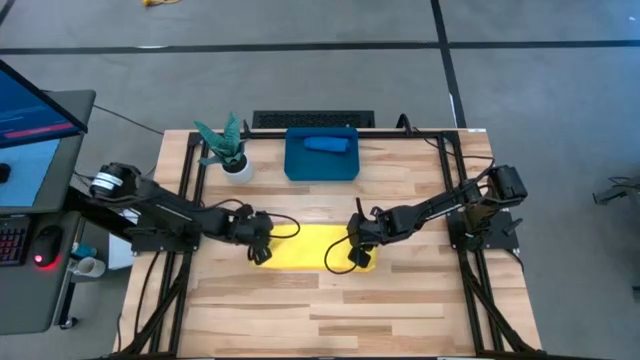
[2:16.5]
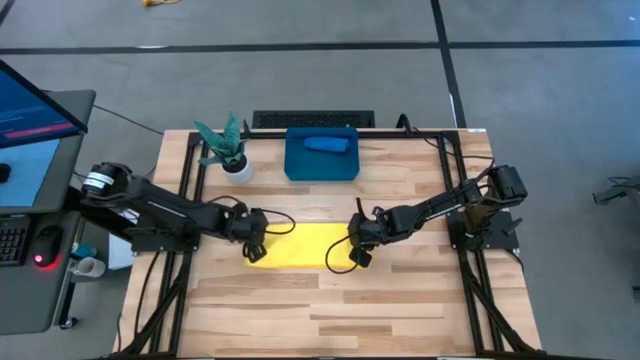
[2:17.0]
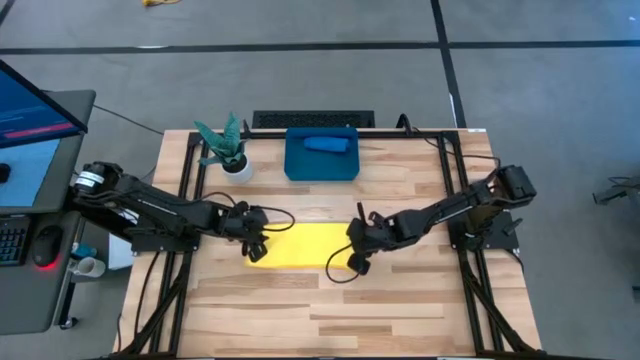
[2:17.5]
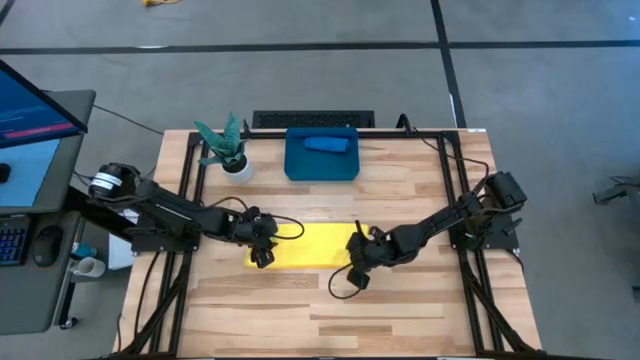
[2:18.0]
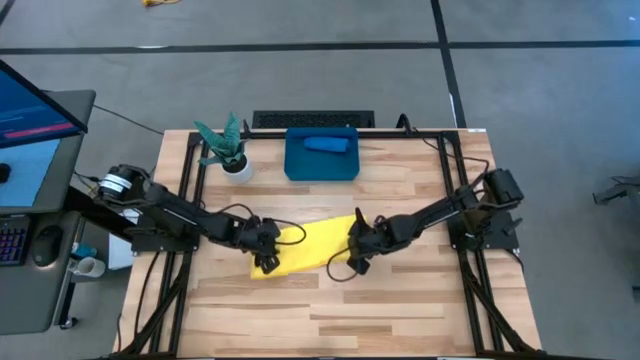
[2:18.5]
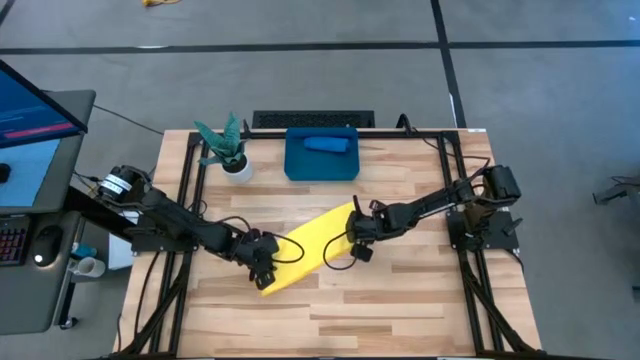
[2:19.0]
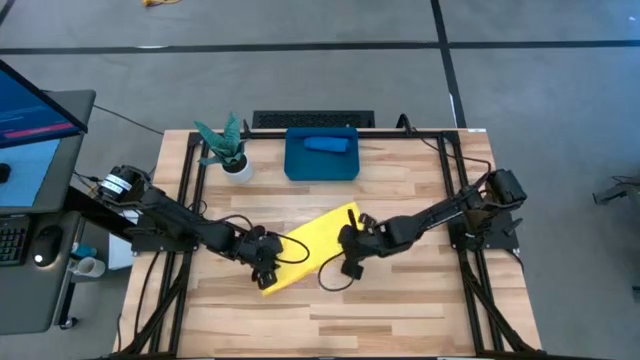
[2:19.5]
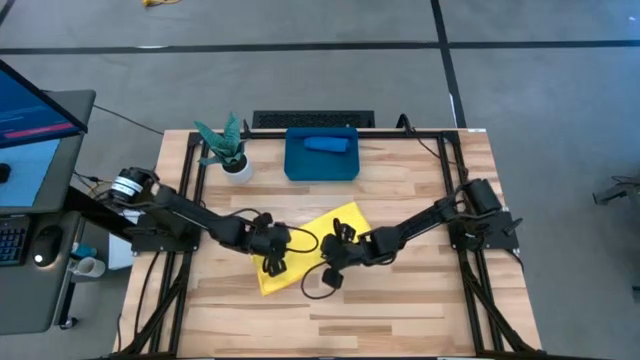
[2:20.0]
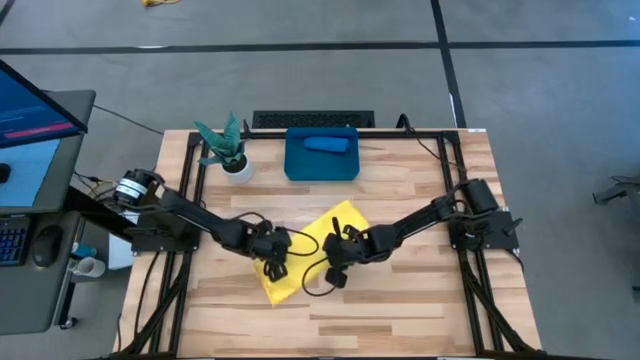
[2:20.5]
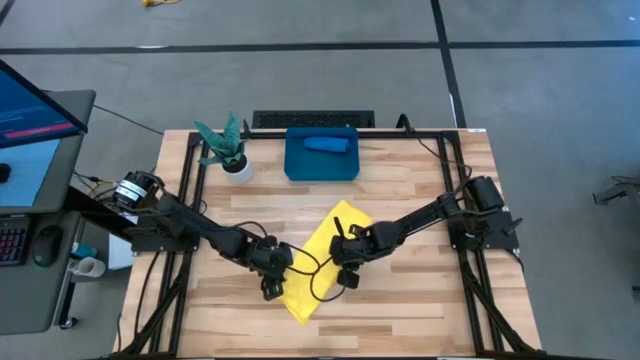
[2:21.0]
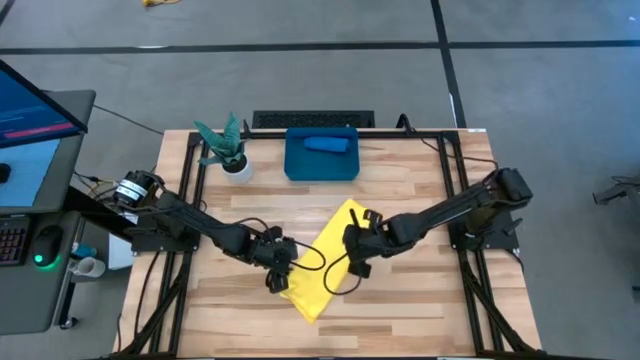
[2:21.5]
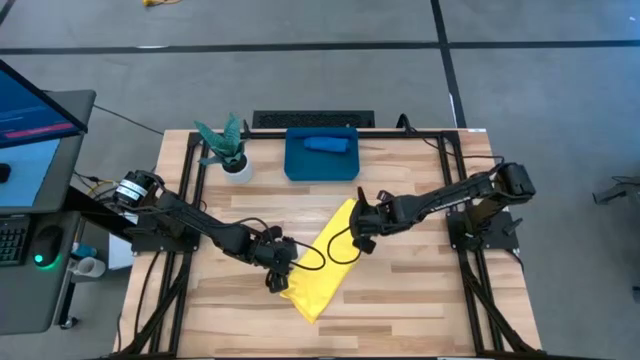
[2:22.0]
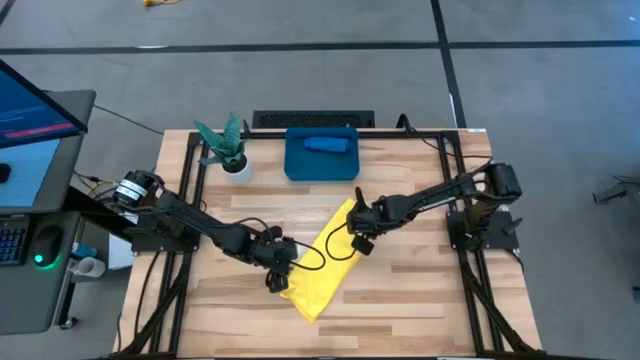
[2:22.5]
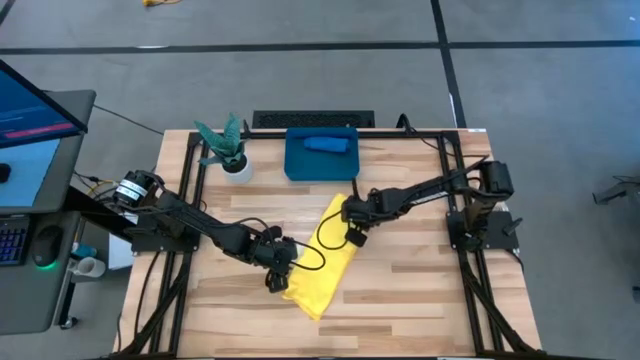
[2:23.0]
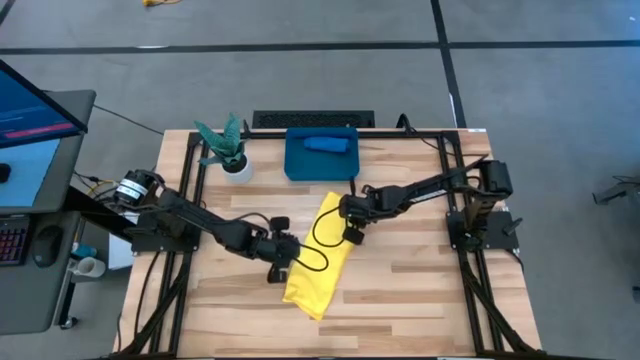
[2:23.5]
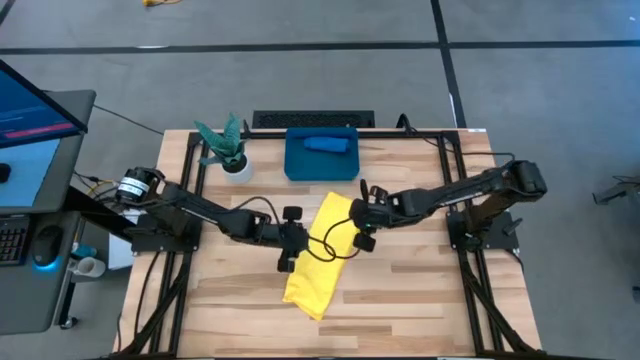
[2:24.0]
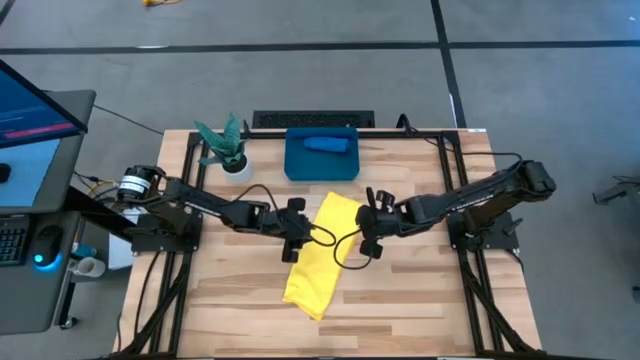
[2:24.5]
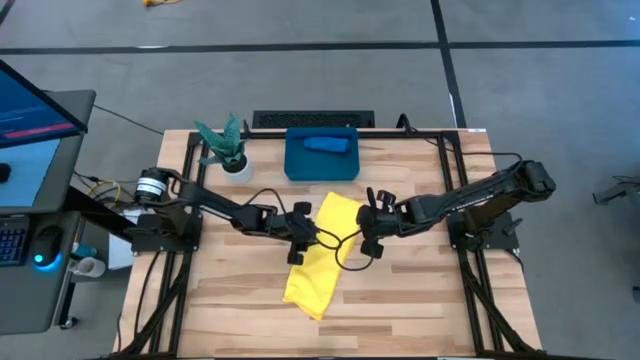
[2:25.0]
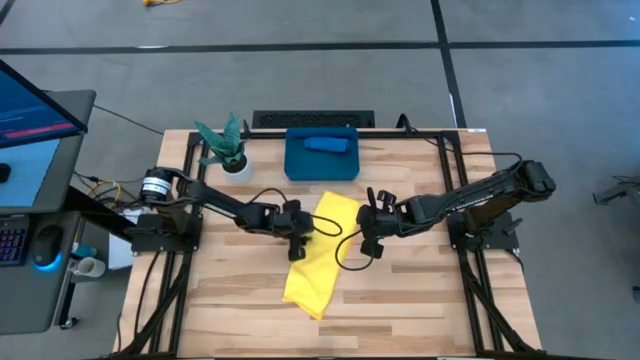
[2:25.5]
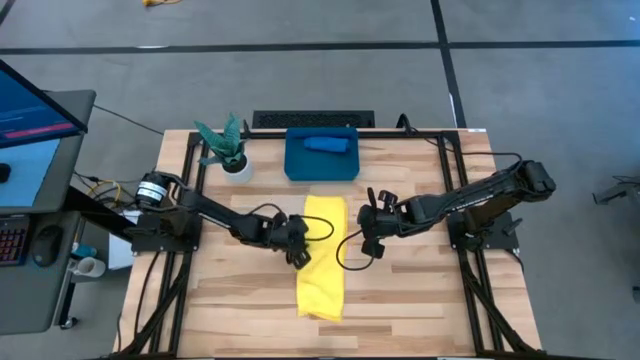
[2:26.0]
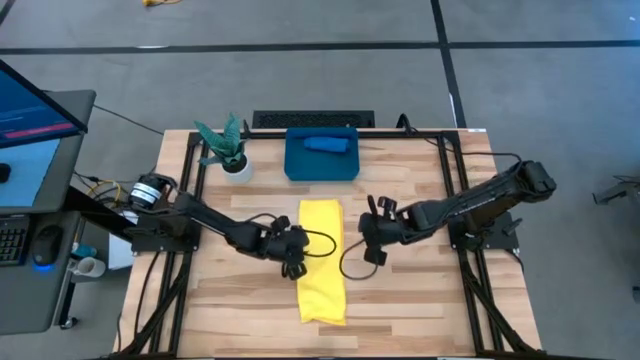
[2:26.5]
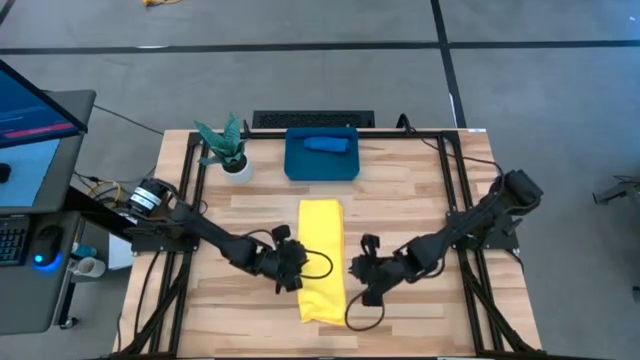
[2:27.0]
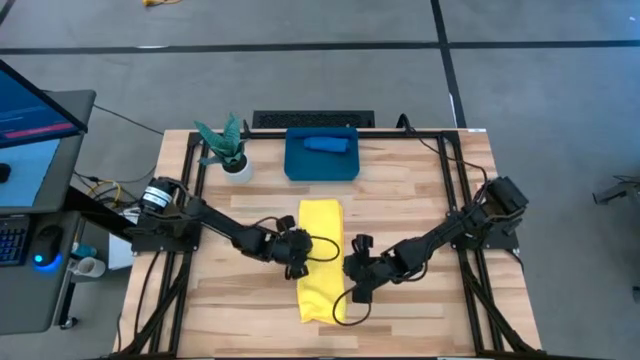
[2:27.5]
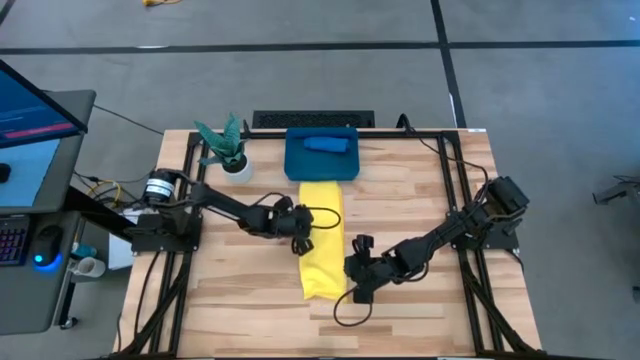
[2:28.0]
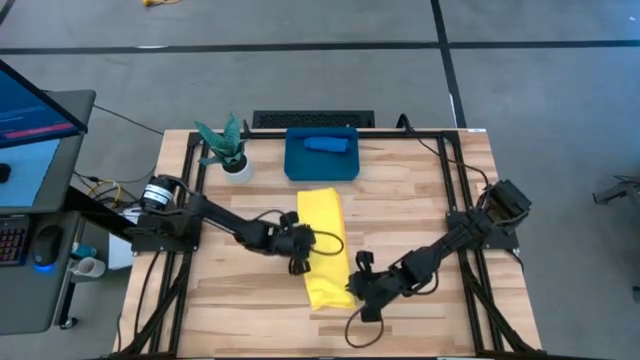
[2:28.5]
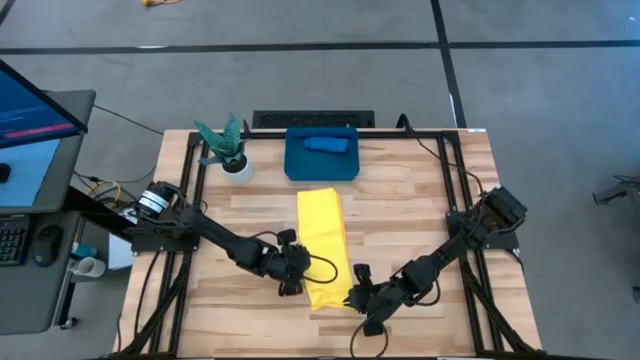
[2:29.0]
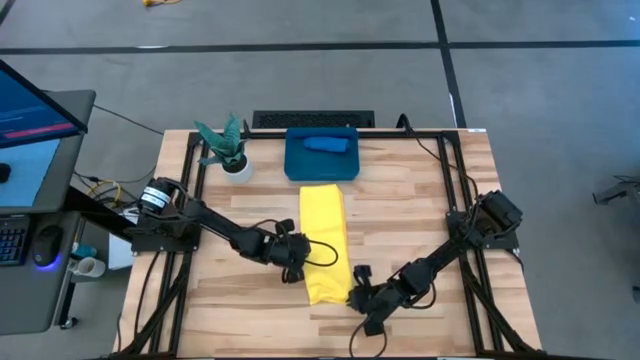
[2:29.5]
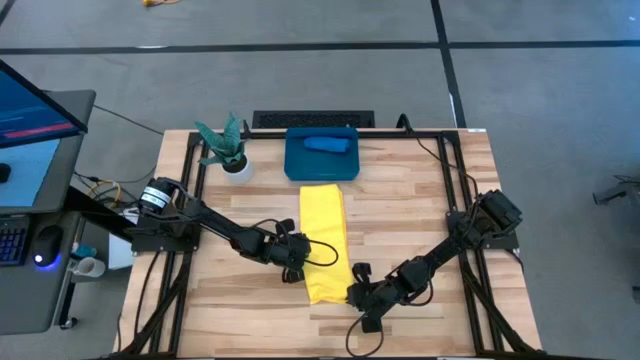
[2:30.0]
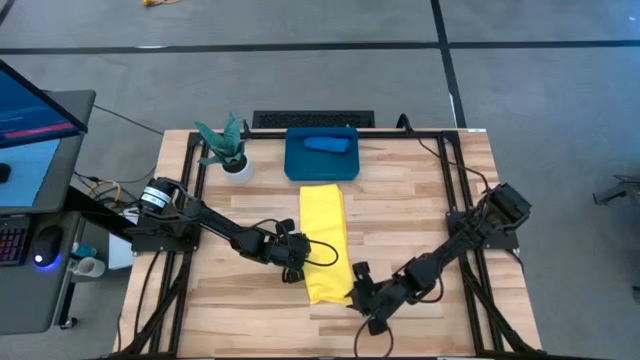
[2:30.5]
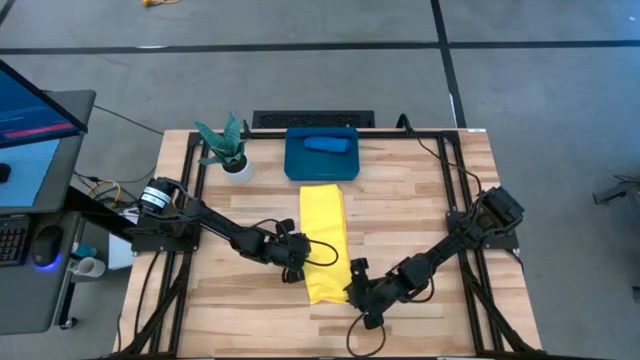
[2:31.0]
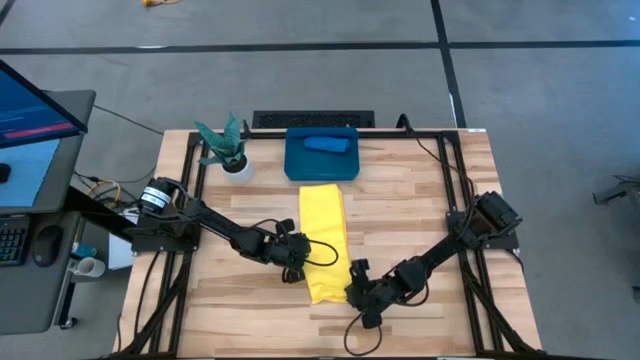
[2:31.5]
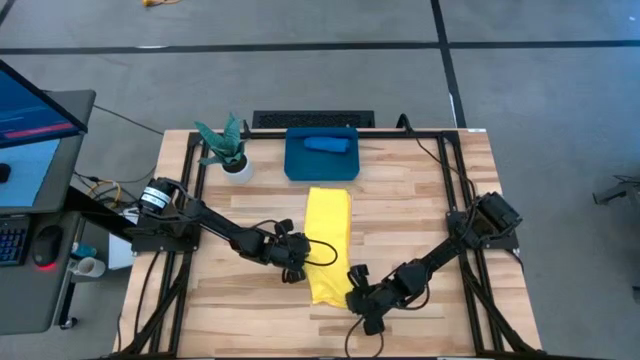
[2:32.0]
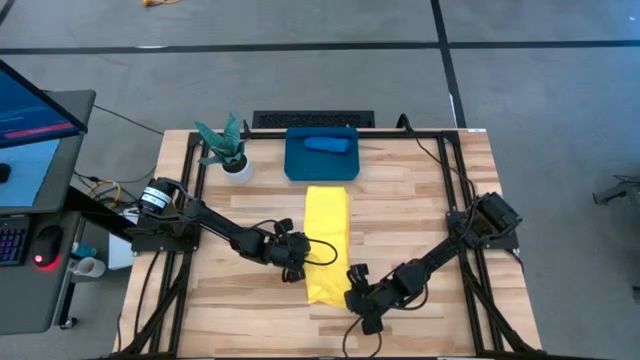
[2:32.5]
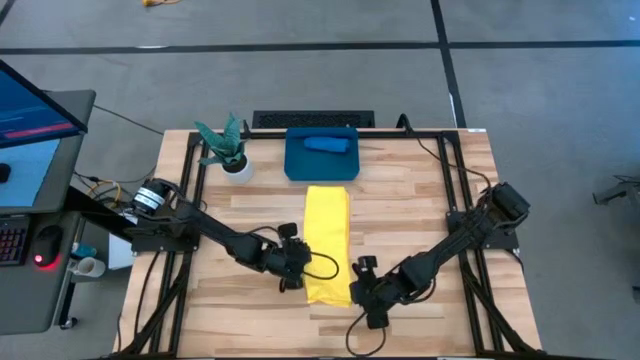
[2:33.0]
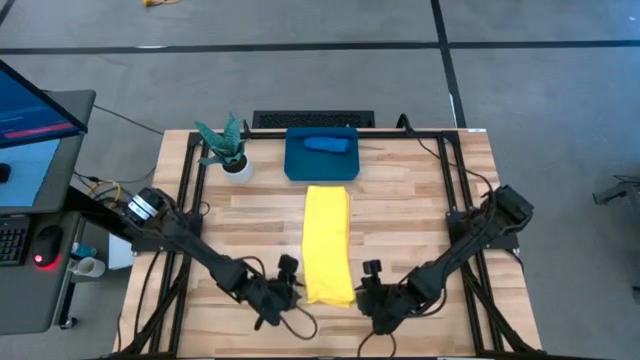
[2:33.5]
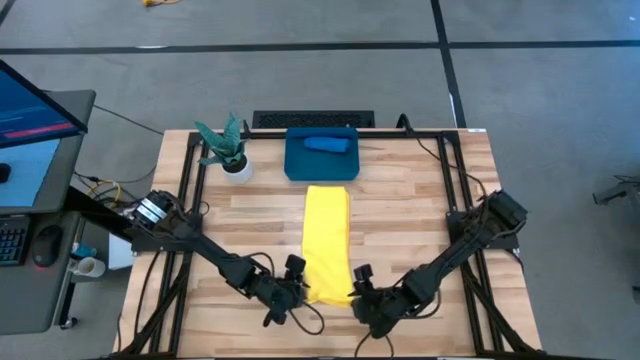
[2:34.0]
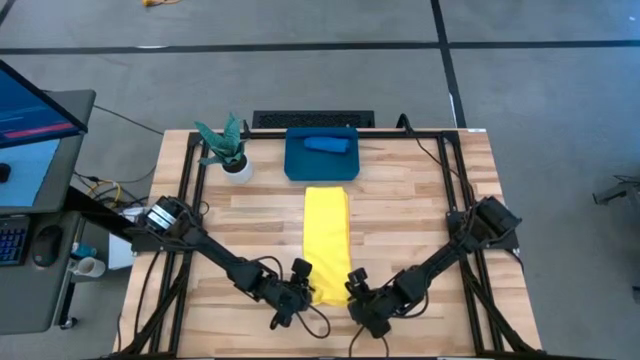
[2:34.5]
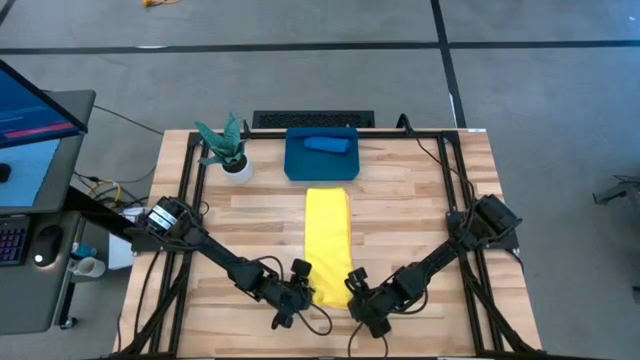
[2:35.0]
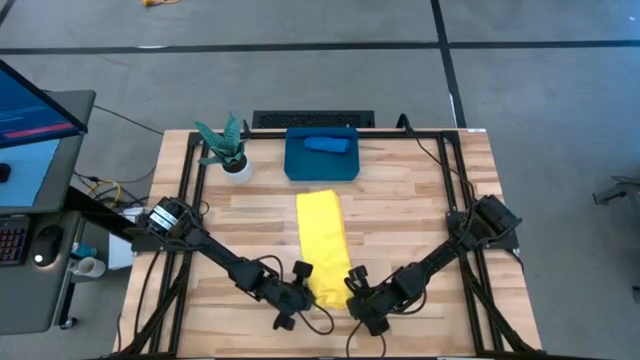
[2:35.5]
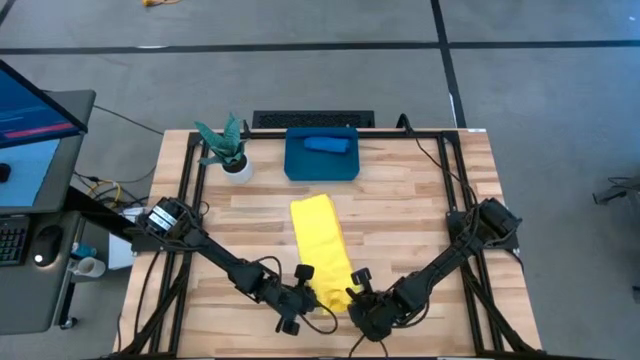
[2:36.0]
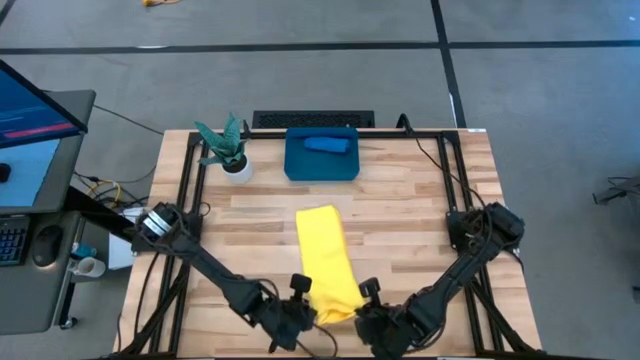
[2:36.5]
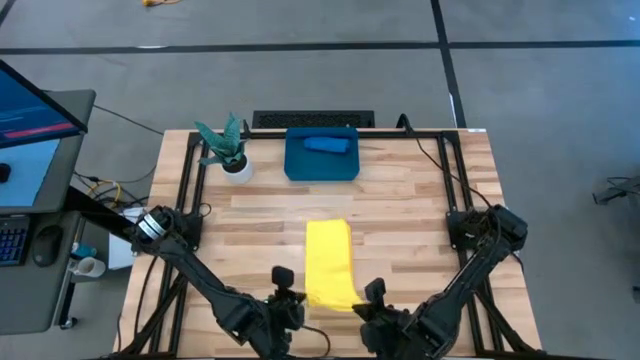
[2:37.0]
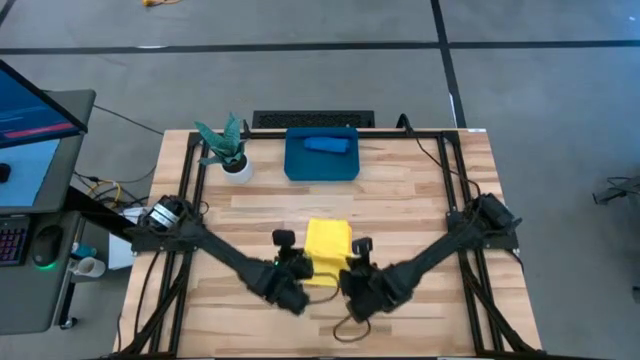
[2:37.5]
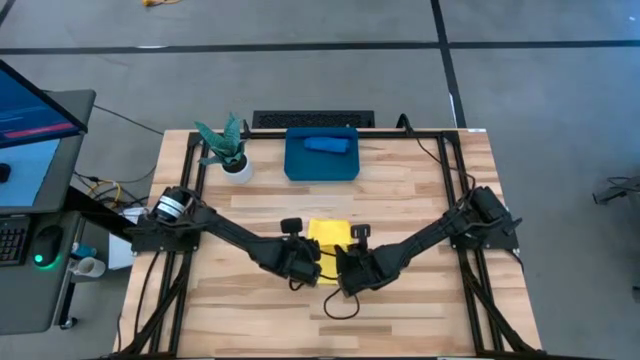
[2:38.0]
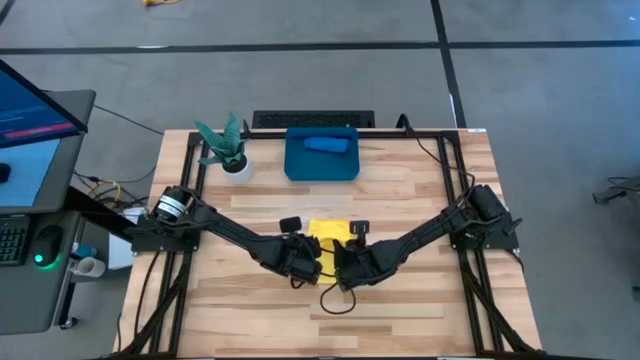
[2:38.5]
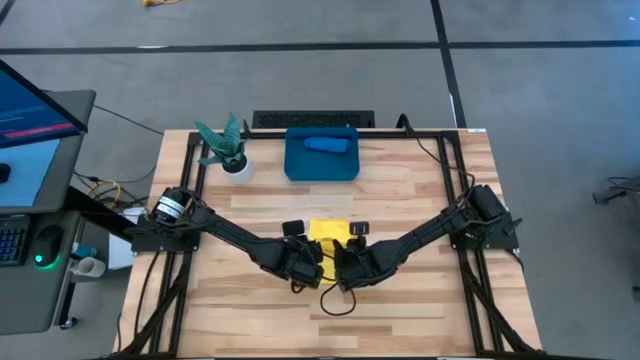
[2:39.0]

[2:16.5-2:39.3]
Task: Roll microfiber towels into tight, uniform cylinder then place into a basket
Fold the yellow microfiber towel
